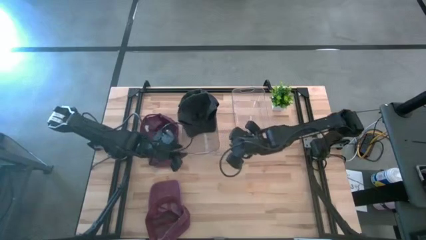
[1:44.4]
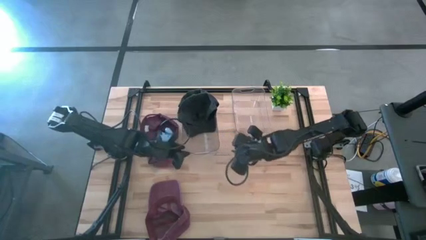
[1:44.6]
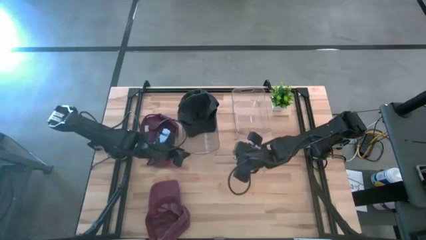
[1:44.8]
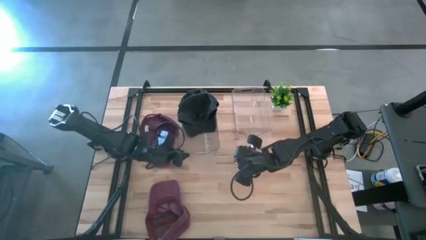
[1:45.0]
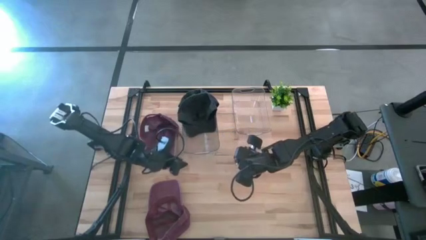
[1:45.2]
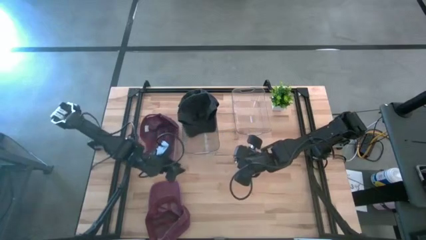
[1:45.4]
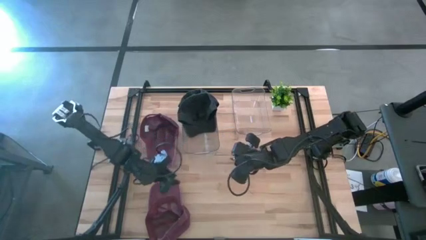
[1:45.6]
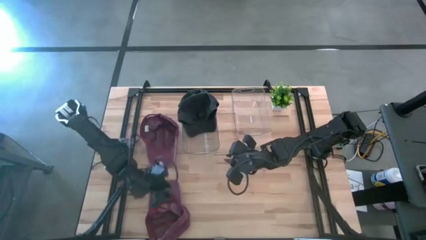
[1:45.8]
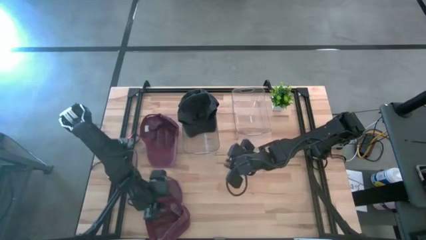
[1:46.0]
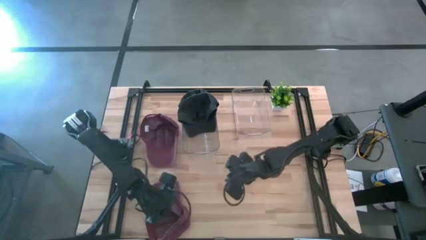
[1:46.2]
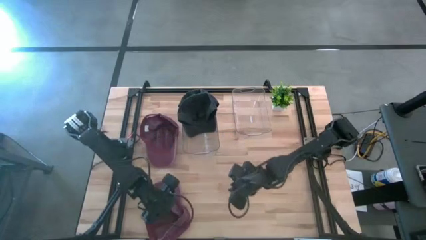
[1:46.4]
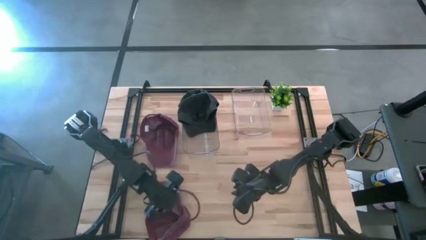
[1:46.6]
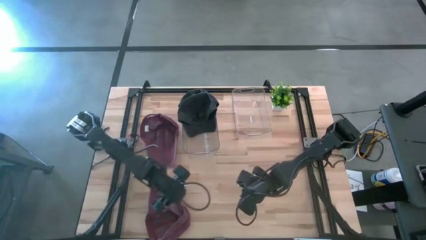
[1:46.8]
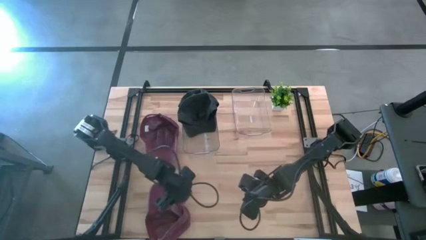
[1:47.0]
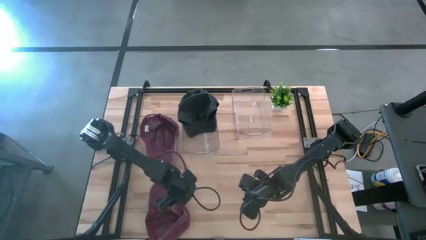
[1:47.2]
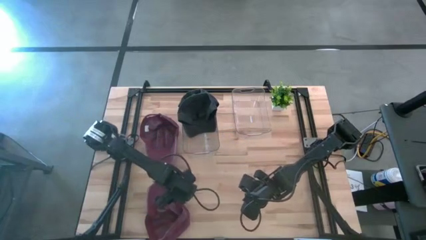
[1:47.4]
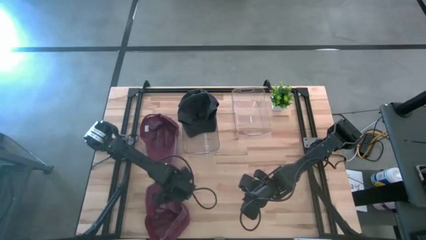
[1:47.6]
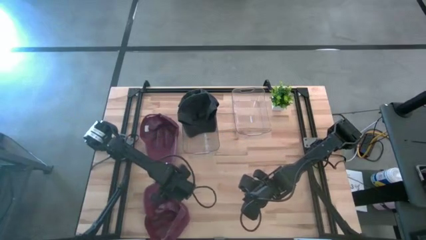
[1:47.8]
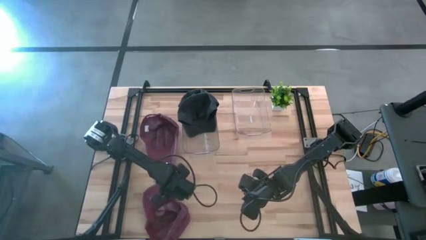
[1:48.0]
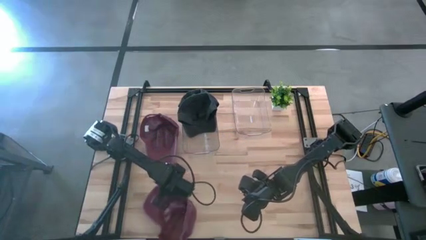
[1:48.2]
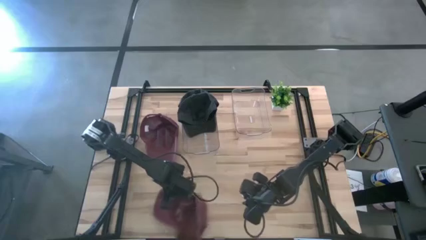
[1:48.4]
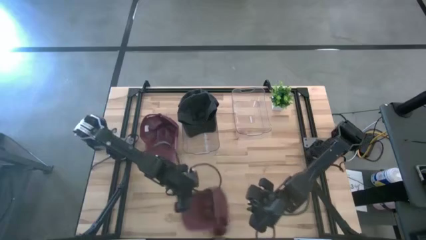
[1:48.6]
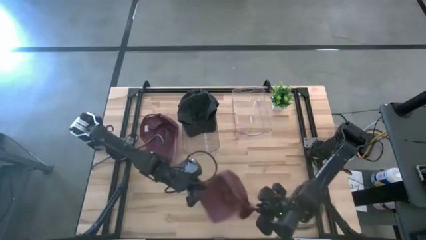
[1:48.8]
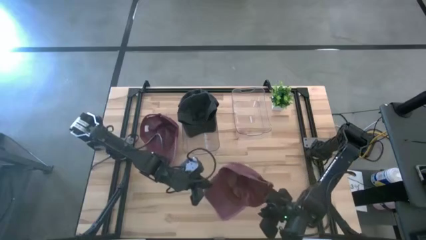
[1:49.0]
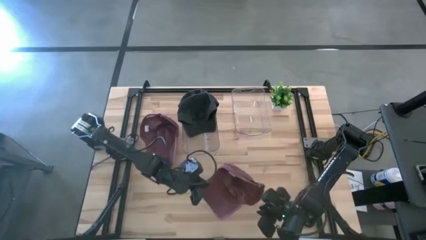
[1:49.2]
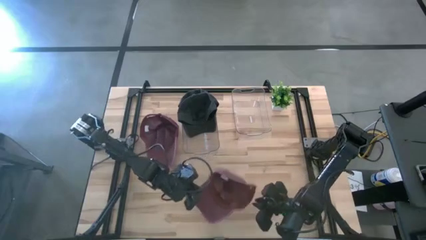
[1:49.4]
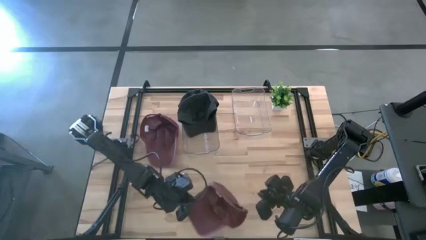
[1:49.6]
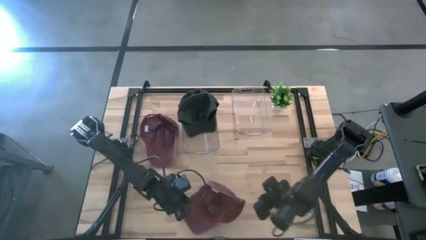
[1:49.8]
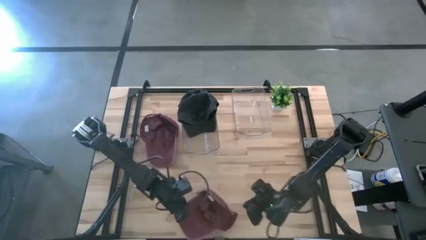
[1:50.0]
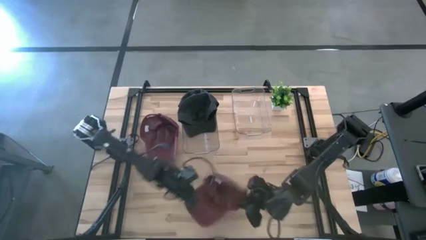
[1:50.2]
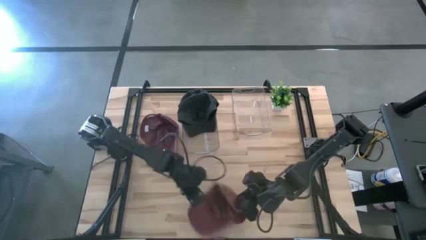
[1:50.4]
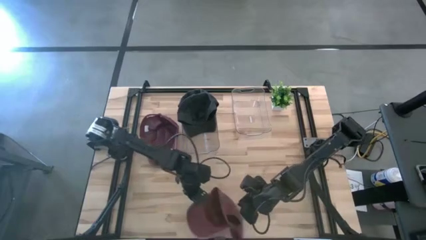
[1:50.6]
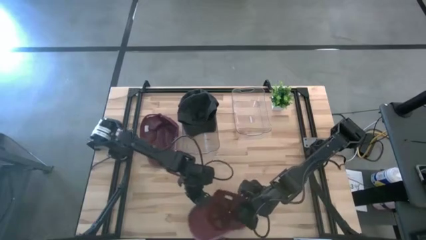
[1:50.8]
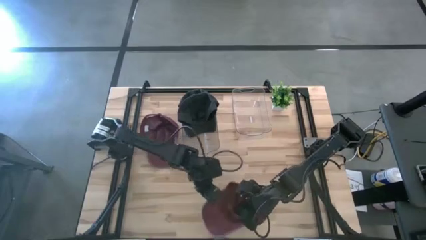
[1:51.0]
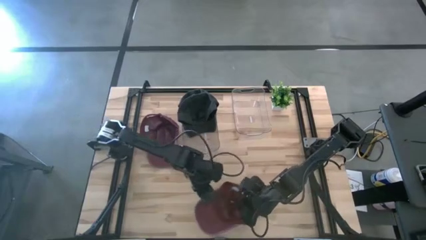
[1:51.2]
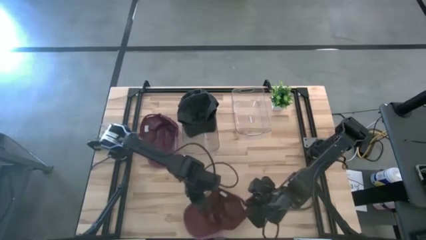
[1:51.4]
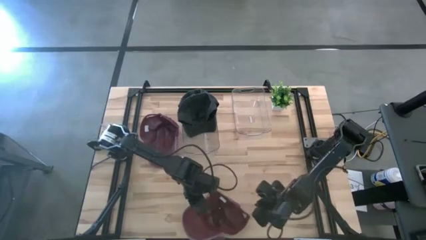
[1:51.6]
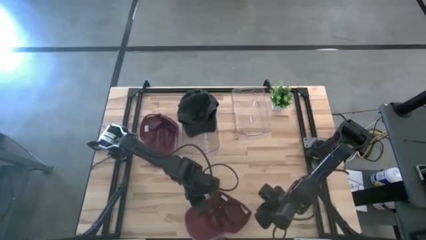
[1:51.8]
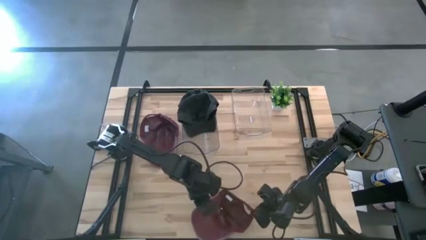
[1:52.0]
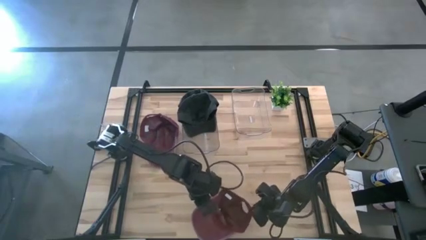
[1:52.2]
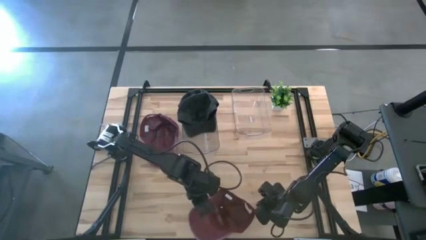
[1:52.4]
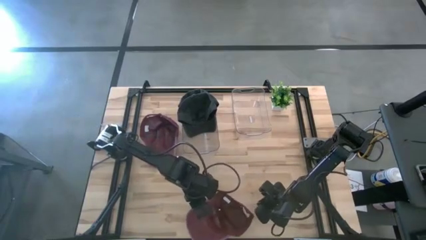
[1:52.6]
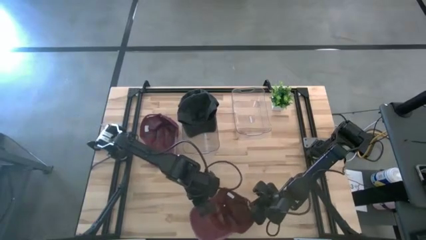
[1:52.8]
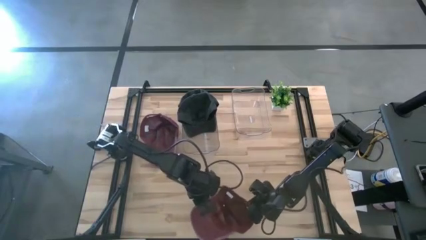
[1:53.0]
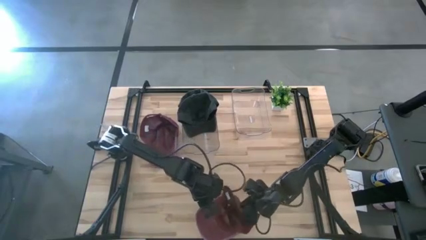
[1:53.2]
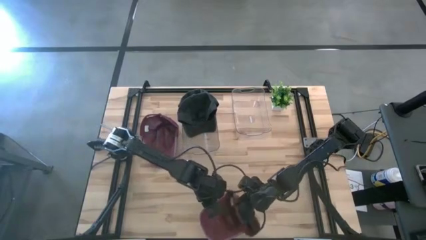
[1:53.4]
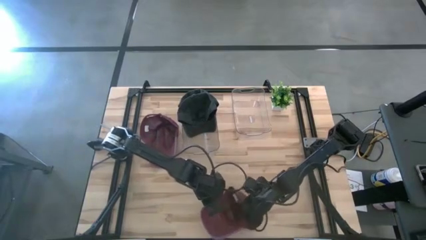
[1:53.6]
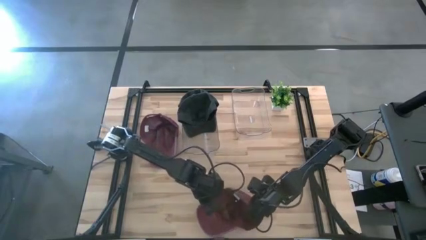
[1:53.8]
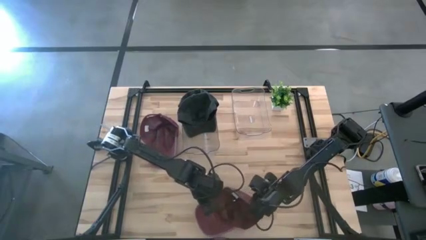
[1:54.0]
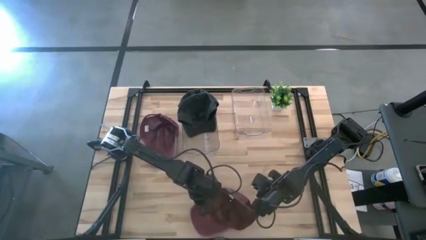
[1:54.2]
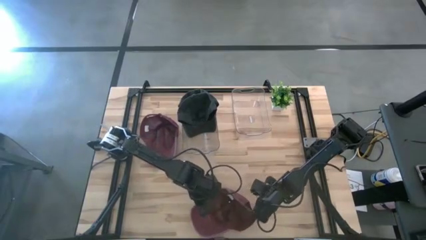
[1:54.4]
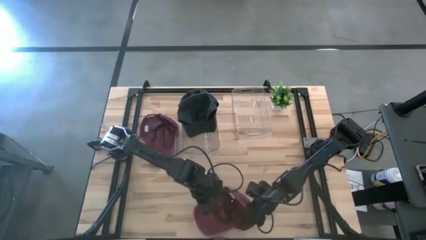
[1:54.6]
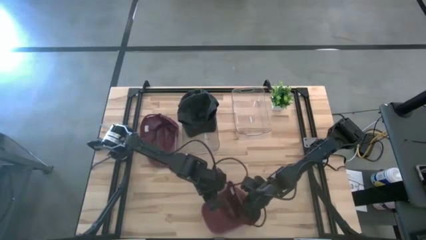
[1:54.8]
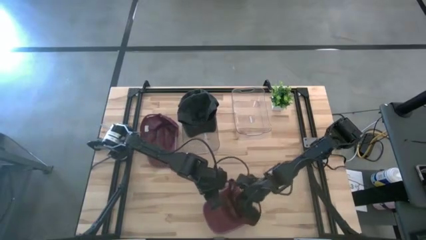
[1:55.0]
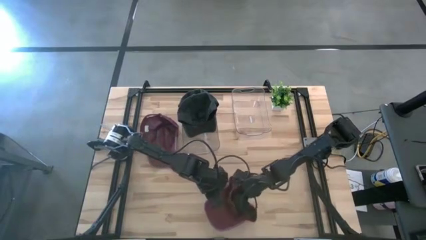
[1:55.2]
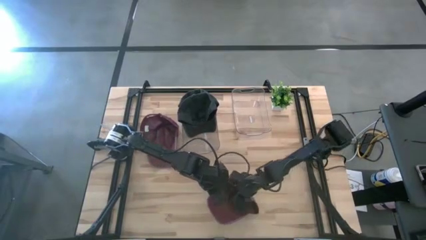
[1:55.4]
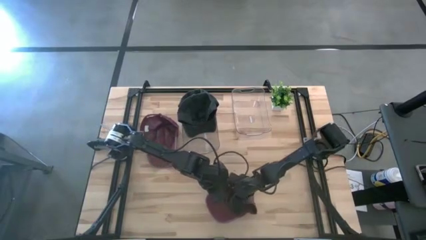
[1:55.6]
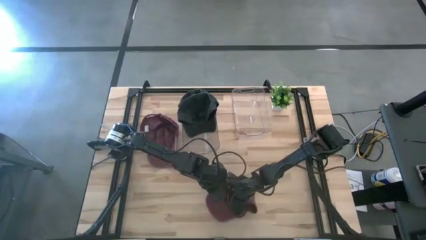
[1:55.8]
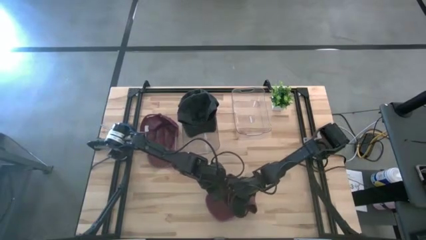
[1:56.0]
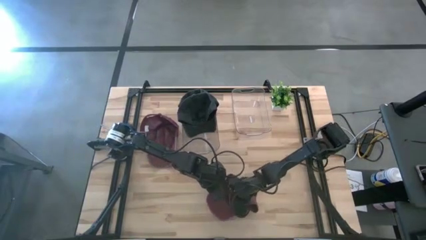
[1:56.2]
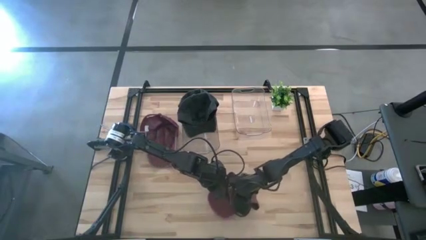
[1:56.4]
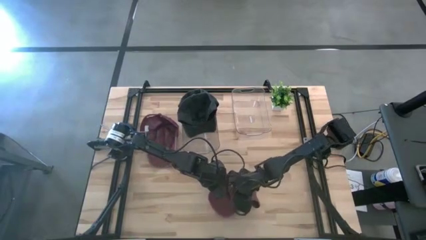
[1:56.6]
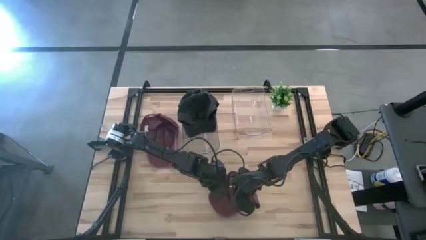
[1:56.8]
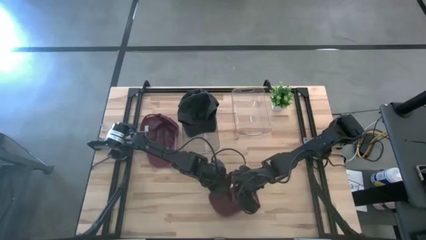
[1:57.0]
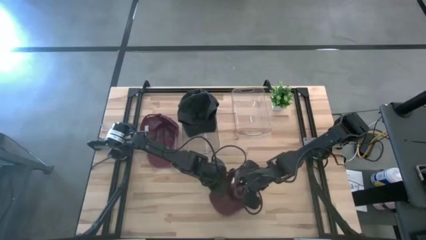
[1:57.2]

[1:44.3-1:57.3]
Task: Pick & Place hat
Put the bottom red cap into the right transparent bin

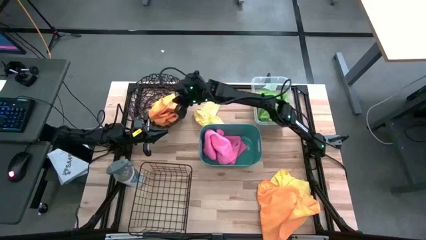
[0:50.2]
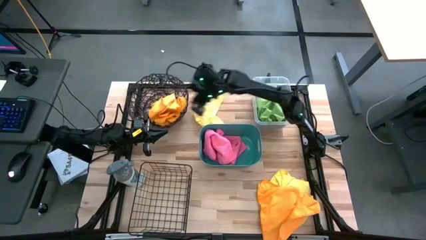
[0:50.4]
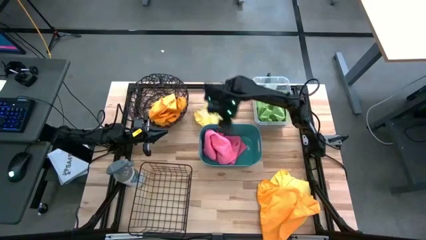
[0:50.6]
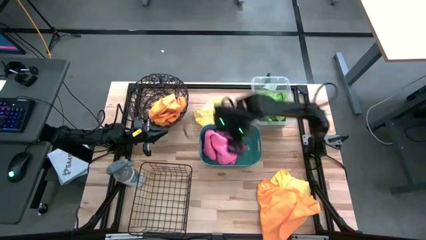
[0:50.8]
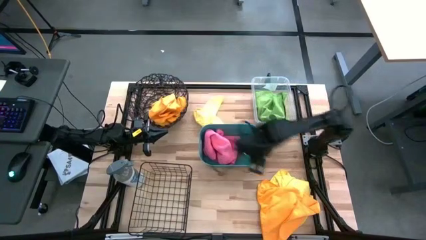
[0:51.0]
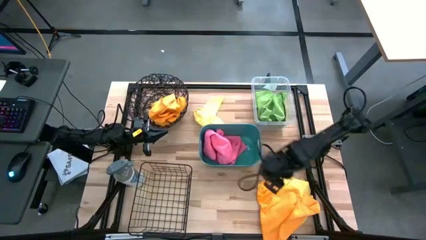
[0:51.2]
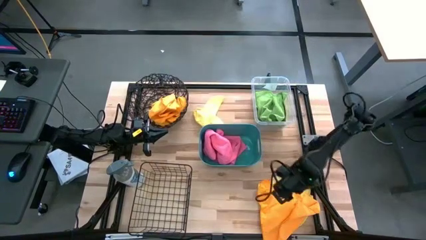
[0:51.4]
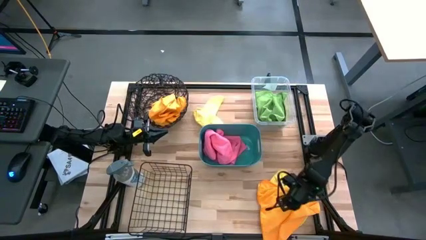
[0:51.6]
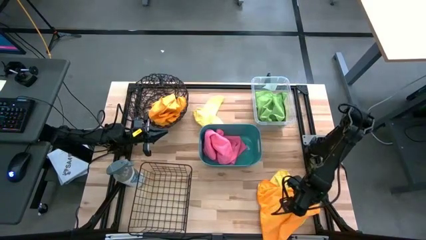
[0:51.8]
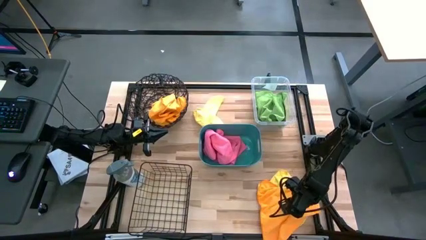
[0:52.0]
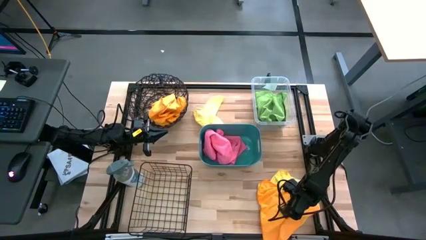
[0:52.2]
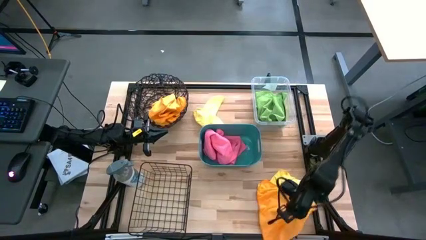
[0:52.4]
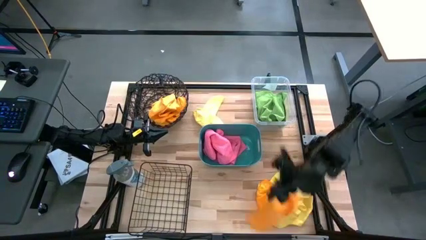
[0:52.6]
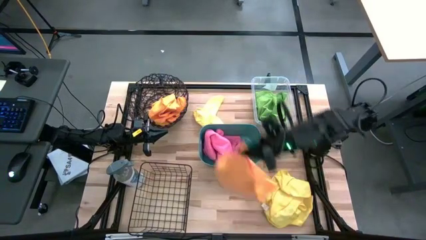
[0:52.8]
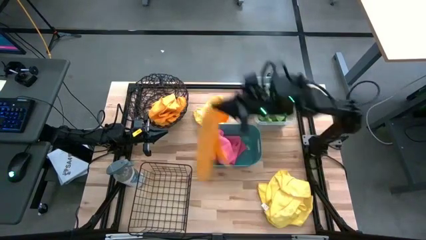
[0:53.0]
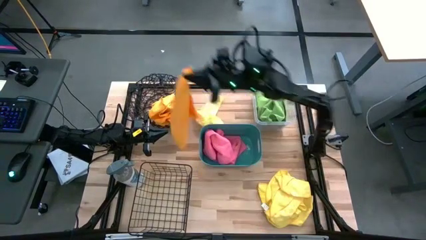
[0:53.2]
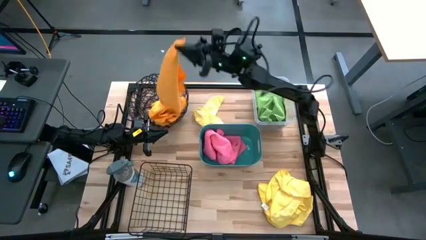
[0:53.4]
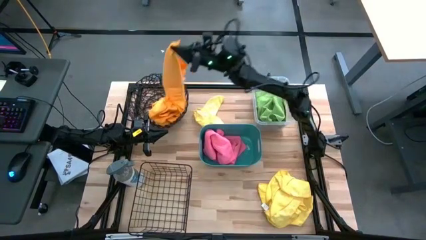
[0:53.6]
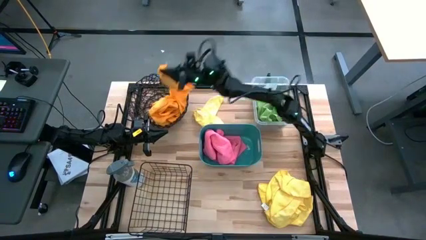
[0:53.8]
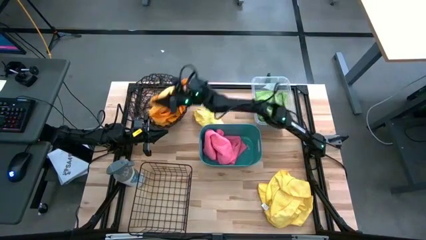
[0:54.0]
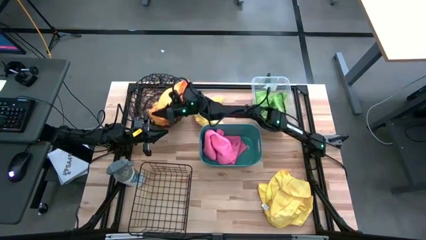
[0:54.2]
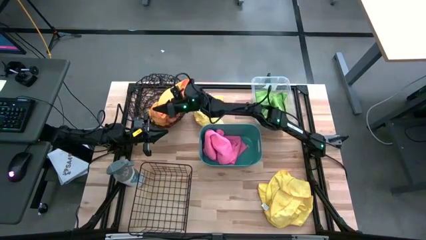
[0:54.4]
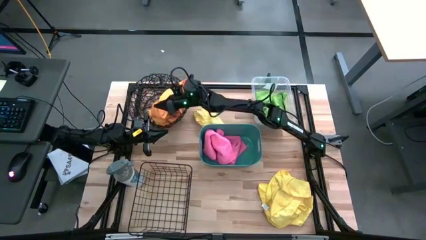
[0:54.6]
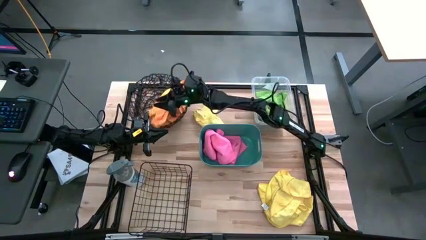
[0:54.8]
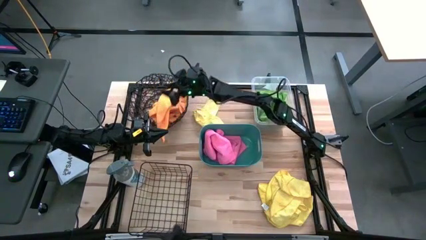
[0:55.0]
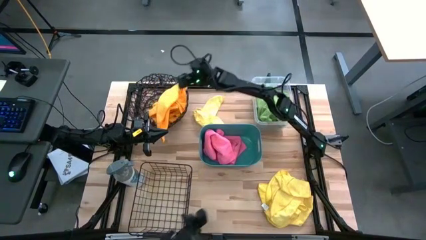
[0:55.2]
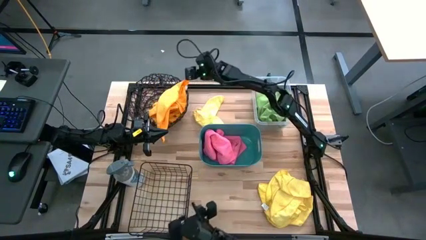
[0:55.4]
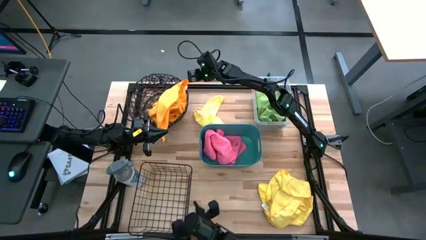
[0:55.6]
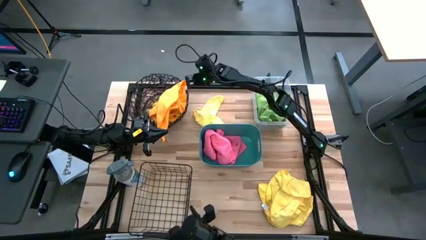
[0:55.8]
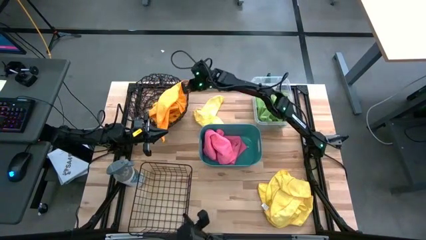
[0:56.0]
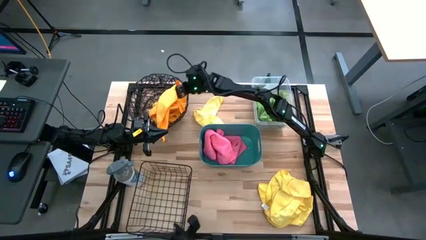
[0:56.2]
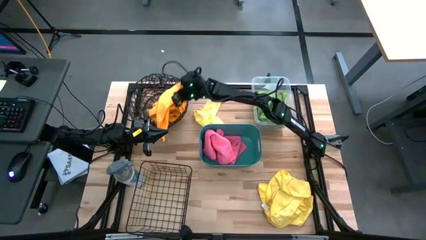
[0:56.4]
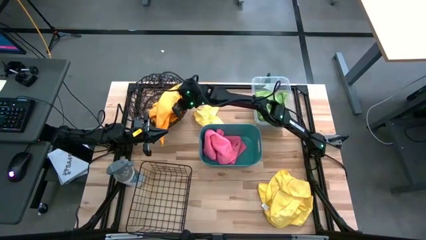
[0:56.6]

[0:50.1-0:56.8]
Task: Sort microfiber towel by color & place in baskets
Put the orange microfiber cloth into the top black wire basket
